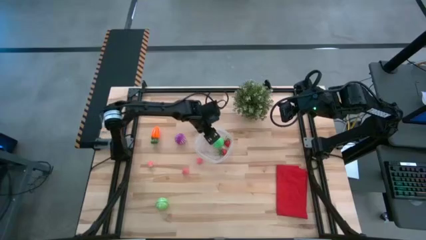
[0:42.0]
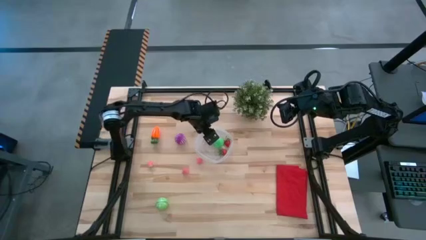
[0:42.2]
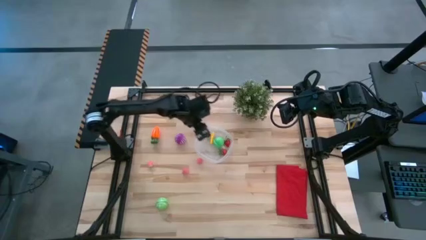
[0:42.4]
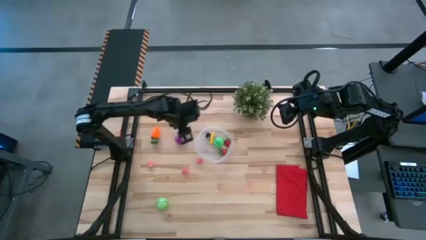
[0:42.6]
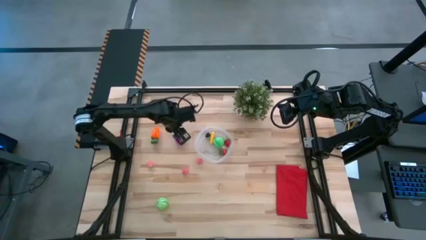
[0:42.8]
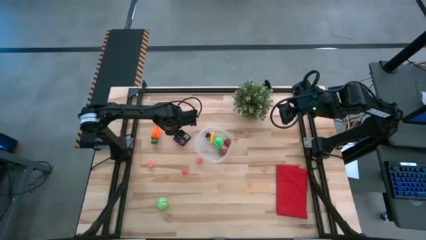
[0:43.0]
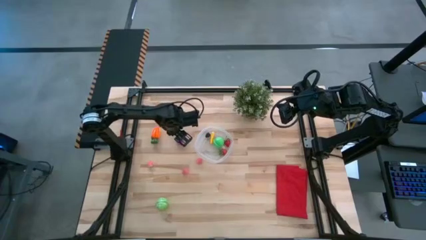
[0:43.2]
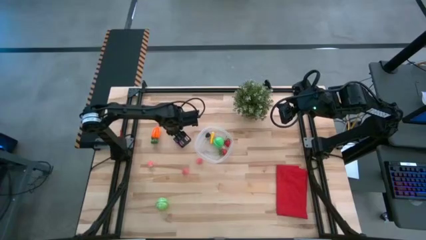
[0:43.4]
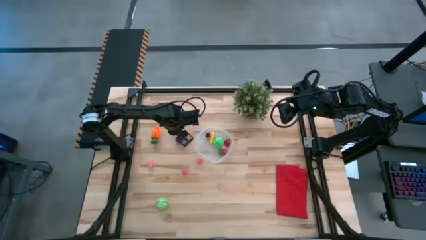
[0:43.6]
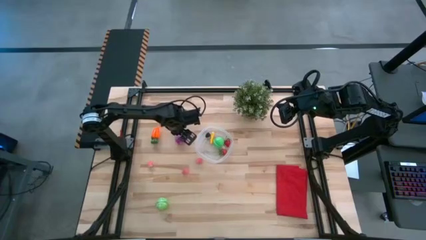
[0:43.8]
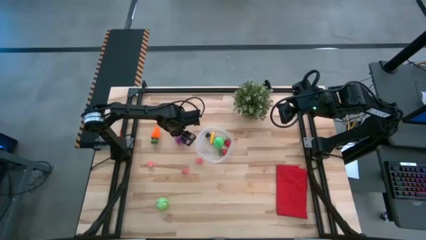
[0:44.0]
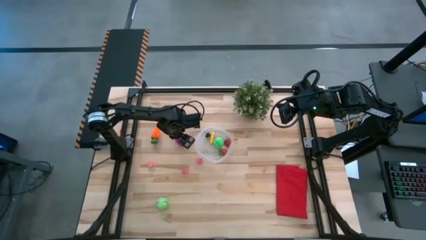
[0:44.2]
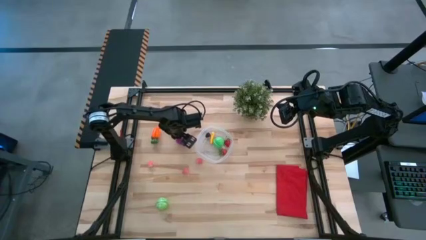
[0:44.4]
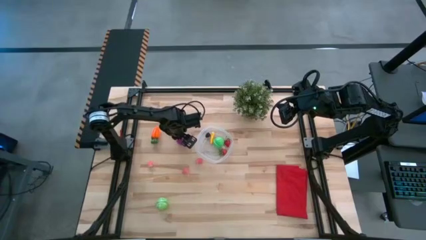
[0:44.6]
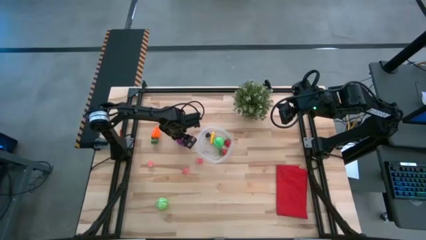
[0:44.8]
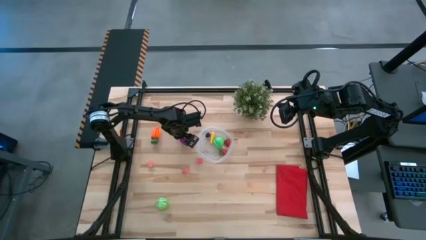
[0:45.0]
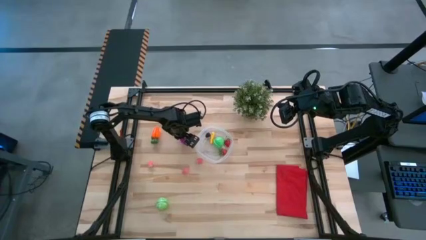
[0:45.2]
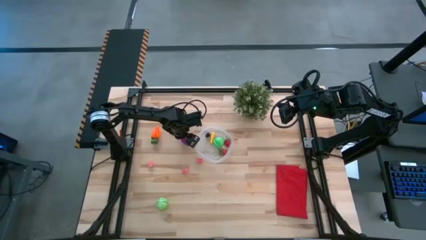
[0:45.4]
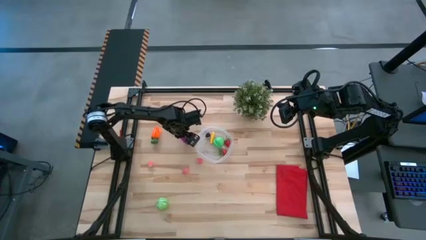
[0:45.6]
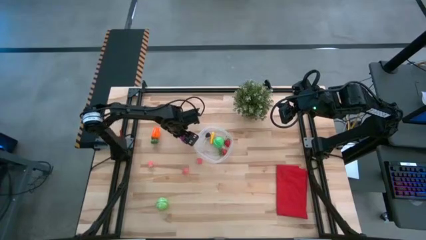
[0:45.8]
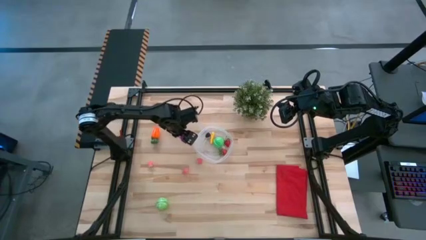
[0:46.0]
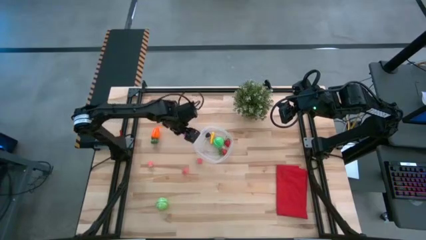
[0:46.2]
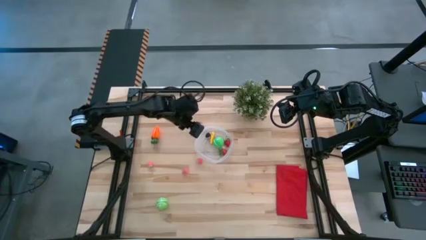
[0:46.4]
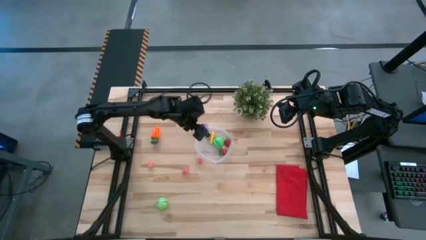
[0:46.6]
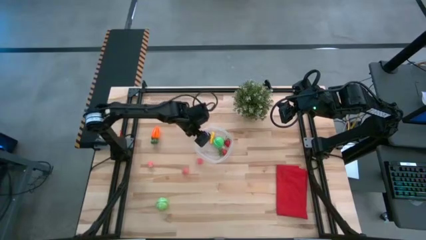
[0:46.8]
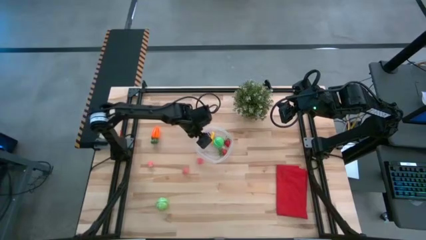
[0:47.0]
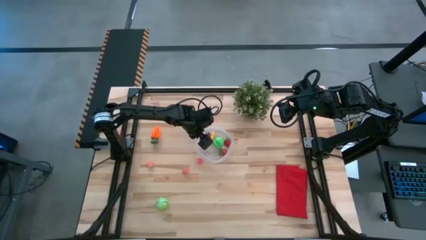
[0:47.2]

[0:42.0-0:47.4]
Task: Pick and placing Produce into tupperware
Put the purple onion into the transparent bin

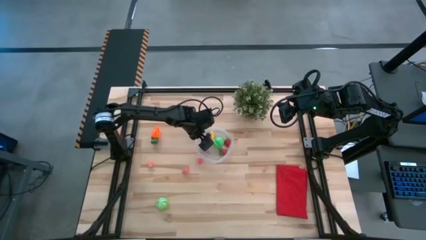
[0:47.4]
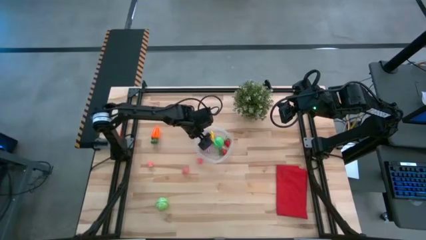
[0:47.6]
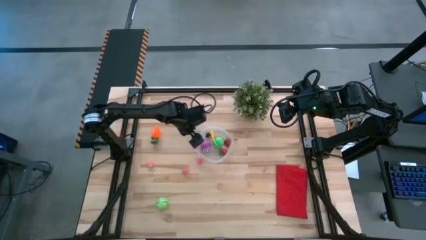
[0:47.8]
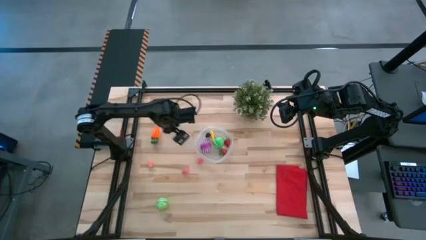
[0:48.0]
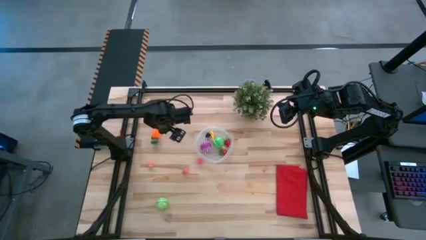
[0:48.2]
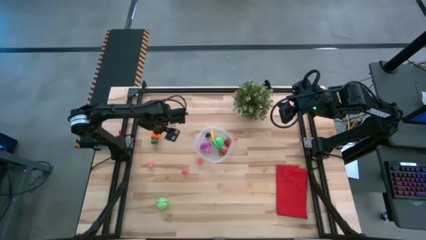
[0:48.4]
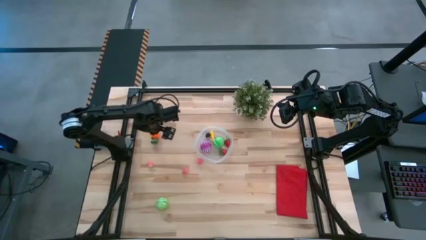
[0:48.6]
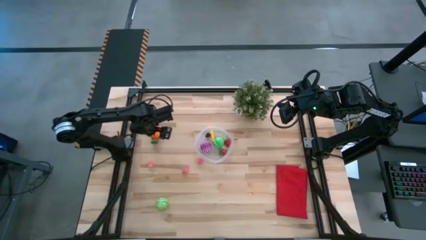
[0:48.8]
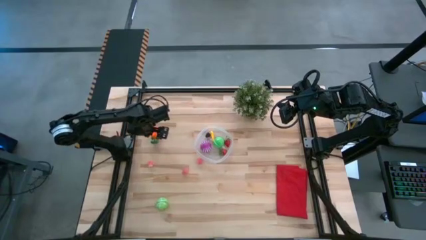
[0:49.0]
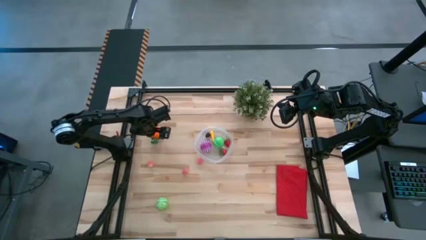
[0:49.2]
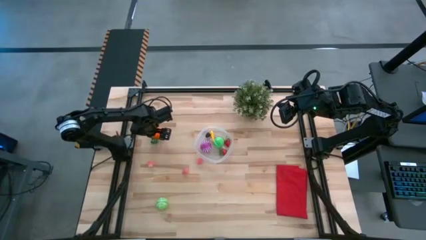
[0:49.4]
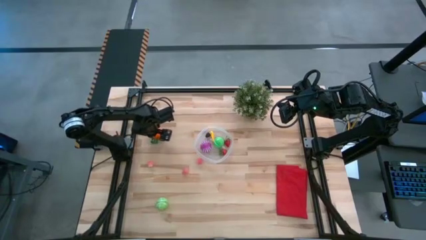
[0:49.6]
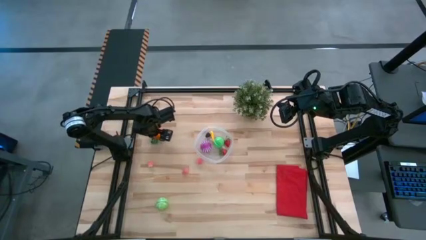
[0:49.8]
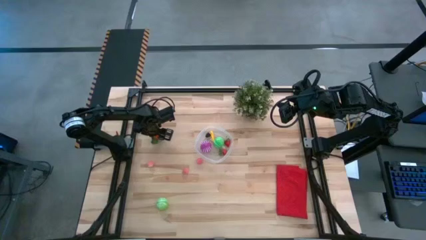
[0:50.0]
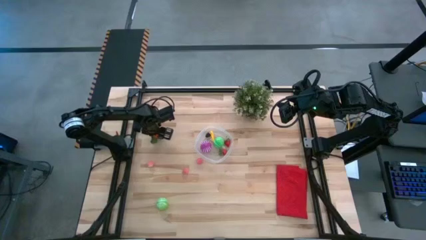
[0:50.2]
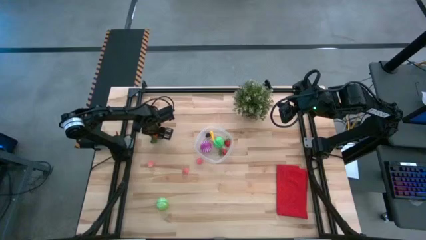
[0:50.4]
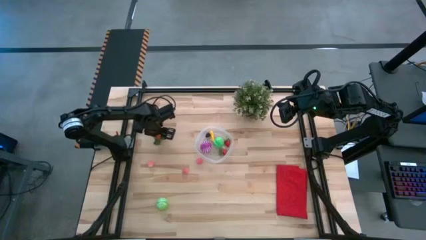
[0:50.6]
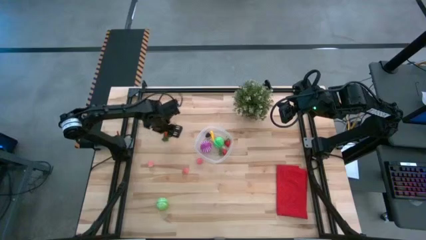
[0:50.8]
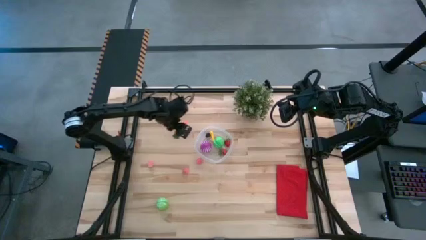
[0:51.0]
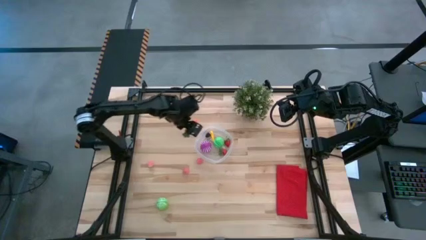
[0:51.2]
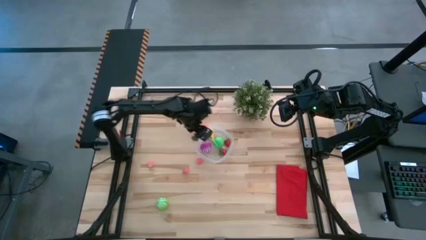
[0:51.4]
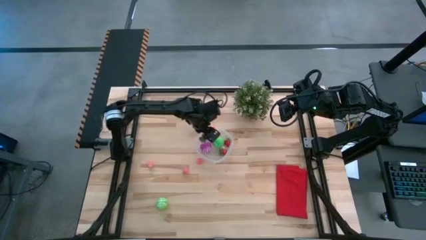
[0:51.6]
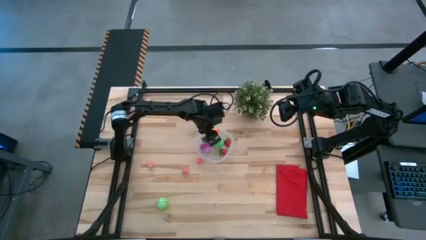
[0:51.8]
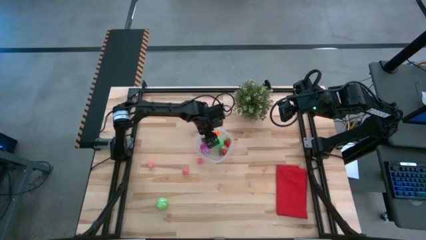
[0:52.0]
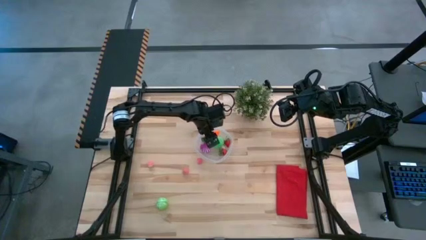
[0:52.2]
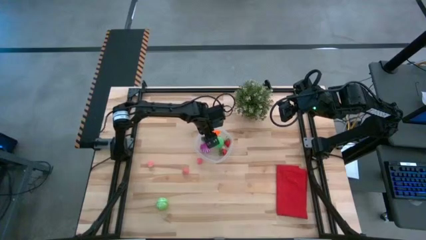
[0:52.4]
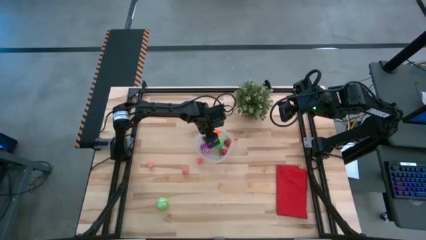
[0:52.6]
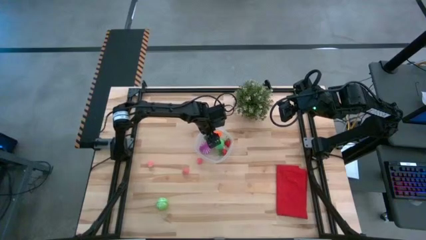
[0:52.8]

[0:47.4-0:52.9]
Put the orange carrot into the transparent bin

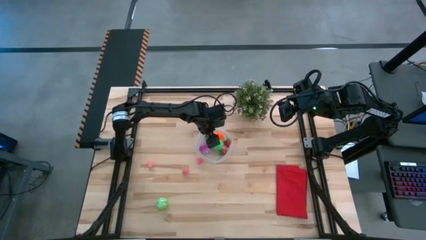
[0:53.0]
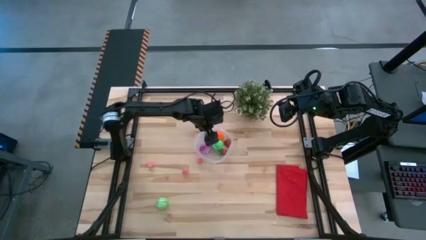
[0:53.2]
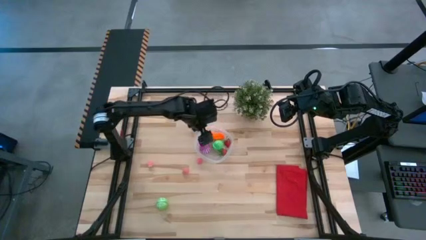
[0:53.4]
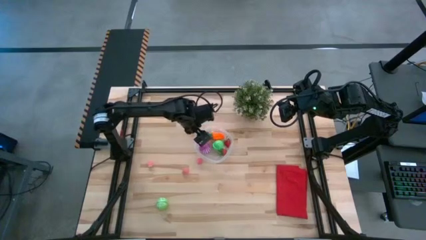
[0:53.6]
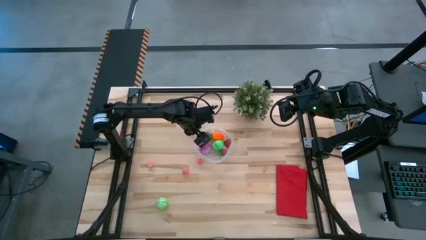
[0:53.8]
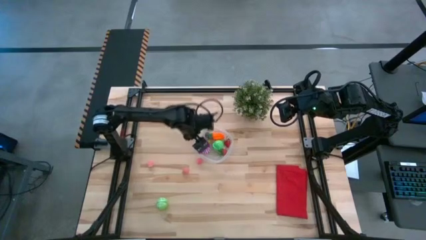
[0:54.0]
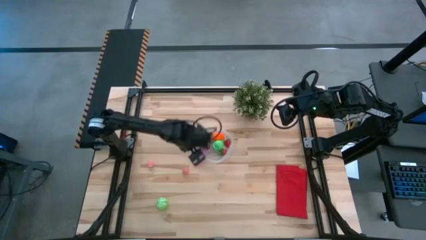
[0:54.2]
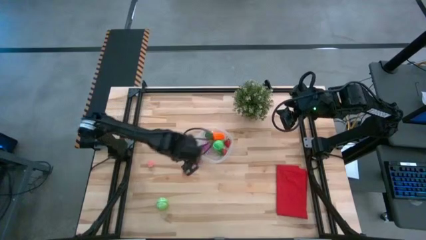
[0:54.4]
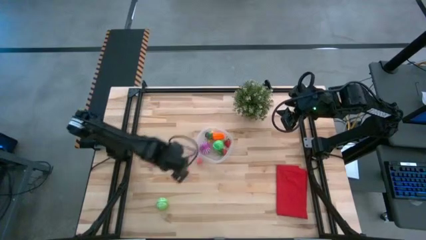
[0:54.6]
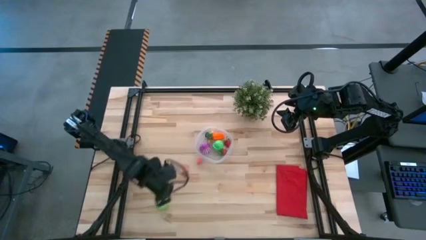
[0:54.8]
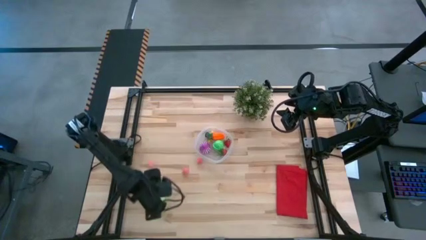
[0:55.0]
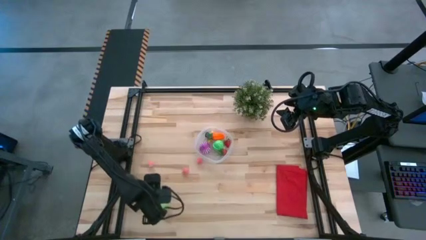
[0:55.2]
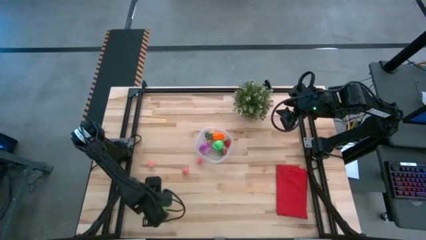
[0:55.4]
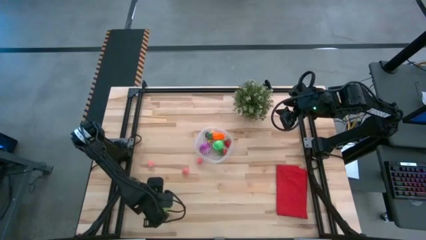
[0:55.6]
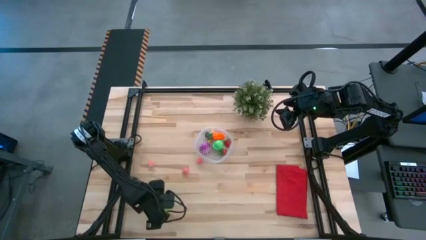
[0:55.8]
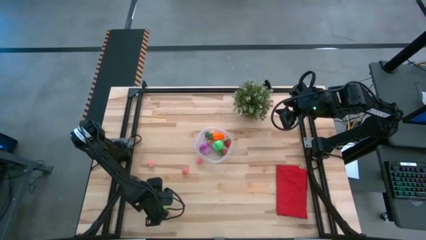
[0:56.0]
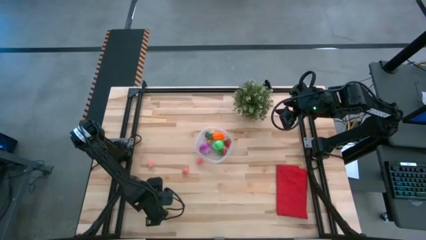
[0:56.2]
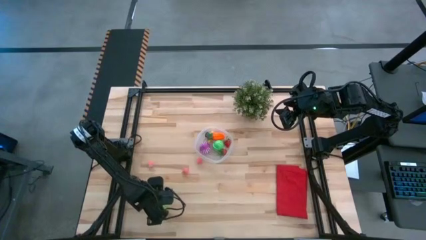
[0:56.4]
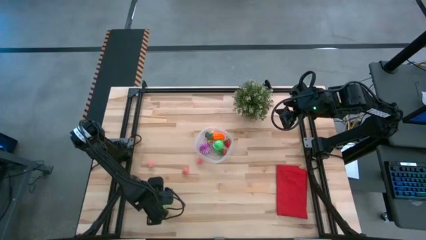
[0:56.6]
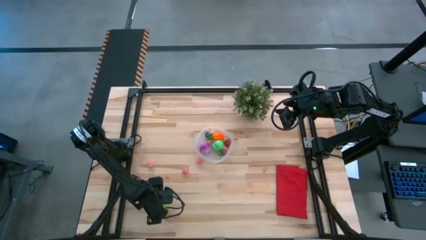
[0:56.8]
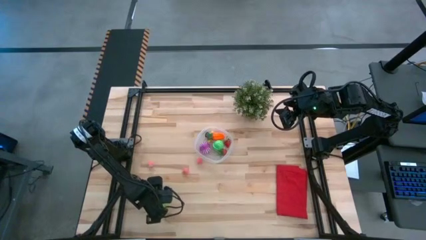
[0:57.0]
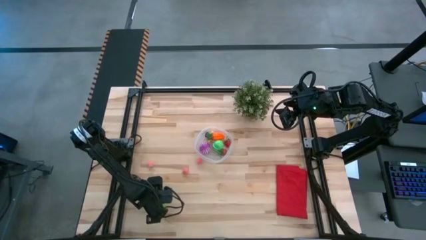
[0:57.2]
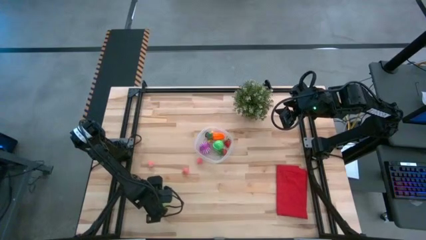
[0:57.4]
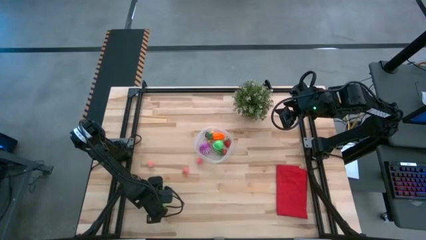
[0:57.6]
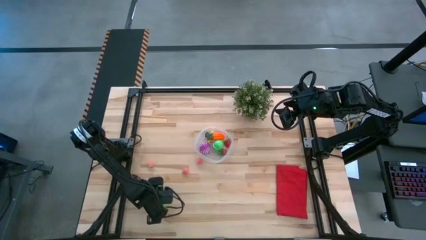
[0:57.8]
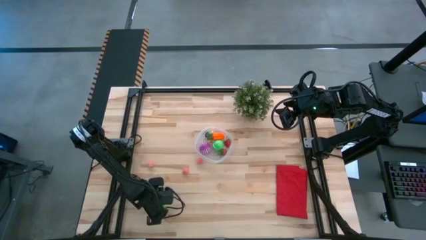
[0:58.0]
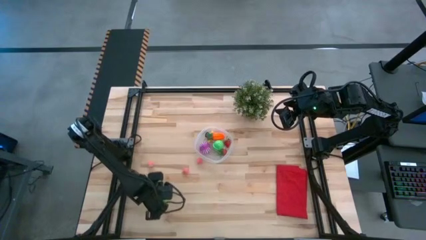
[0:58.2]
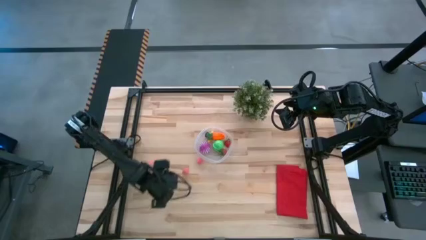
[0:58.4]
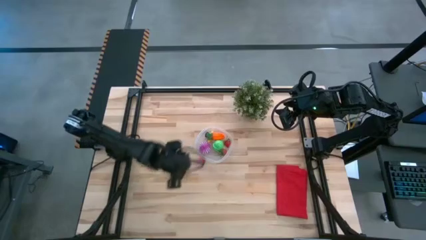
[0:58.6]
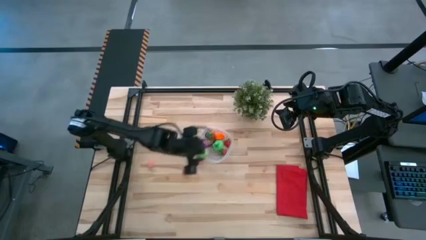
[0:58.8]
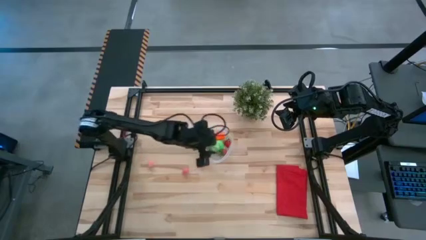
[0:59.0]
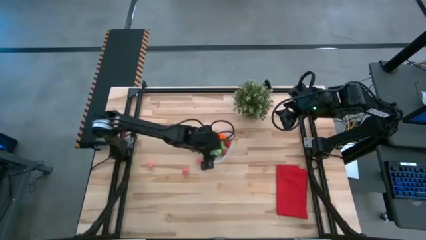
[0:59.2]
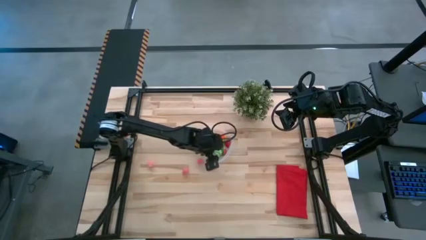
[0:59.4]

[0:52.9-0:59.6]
Put the green cabbage into the transparent bin
